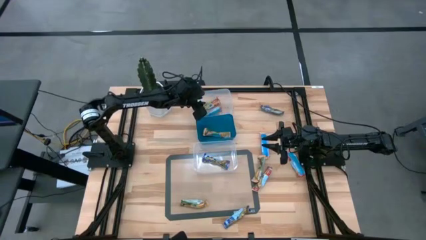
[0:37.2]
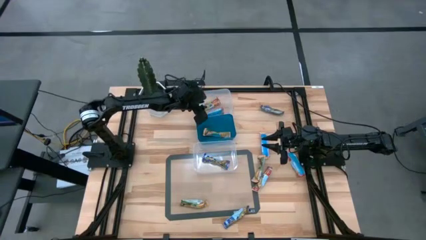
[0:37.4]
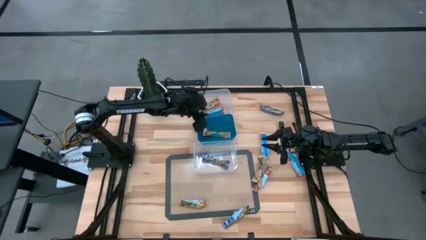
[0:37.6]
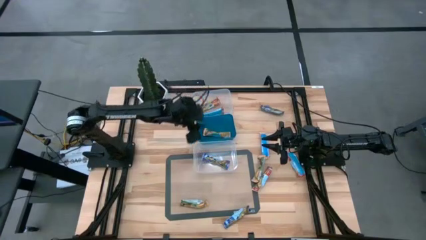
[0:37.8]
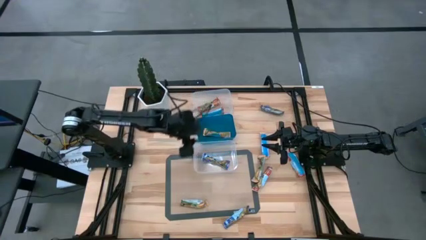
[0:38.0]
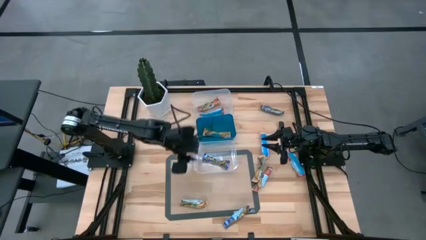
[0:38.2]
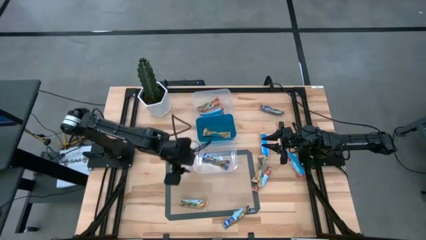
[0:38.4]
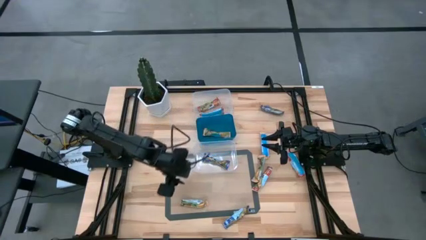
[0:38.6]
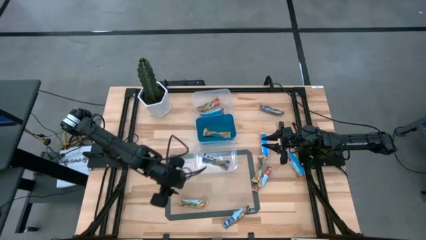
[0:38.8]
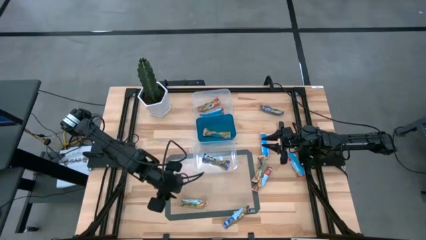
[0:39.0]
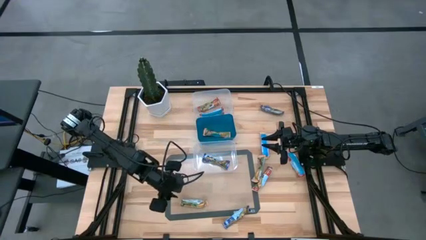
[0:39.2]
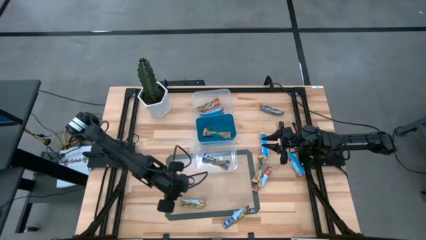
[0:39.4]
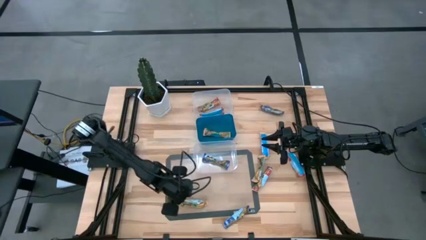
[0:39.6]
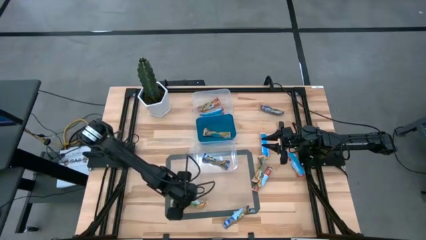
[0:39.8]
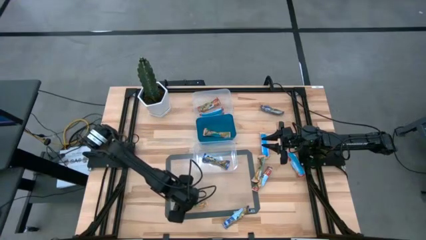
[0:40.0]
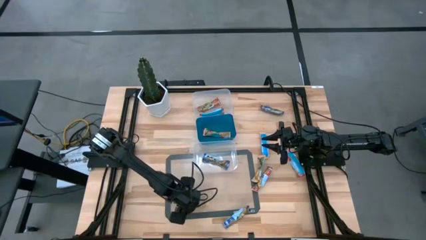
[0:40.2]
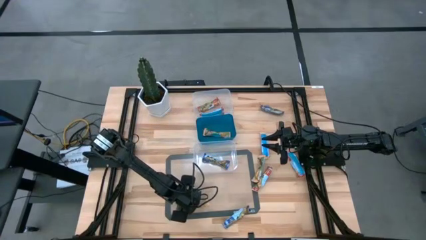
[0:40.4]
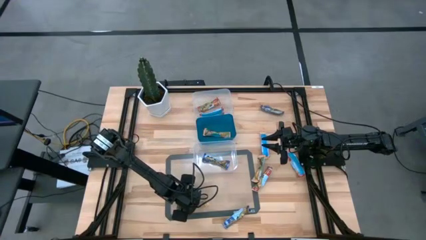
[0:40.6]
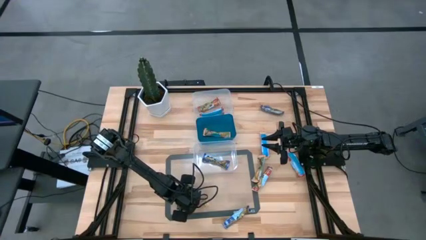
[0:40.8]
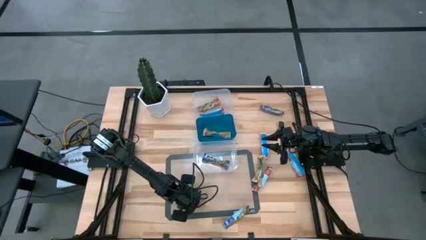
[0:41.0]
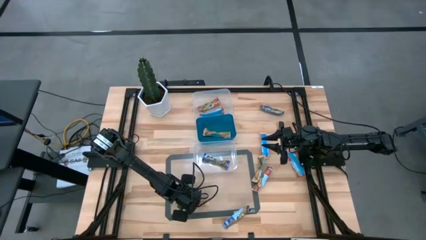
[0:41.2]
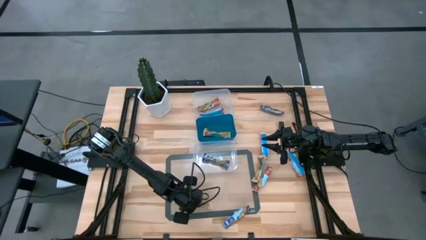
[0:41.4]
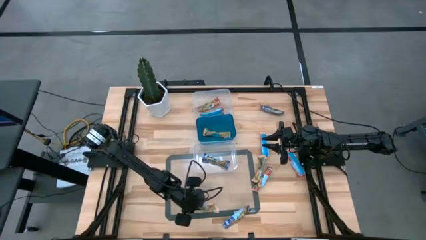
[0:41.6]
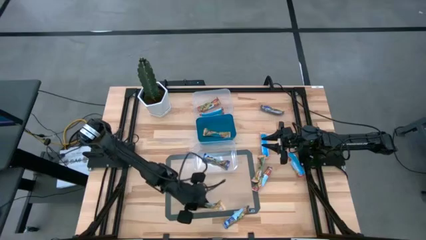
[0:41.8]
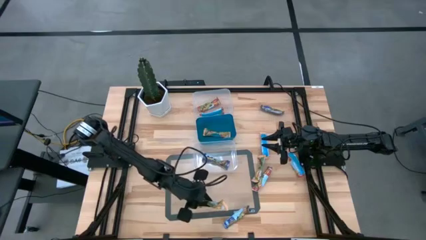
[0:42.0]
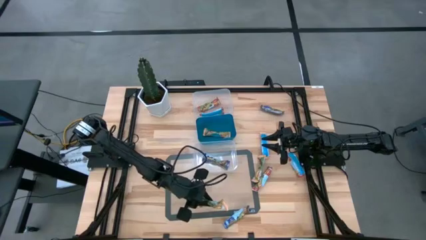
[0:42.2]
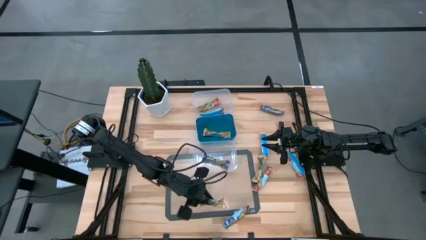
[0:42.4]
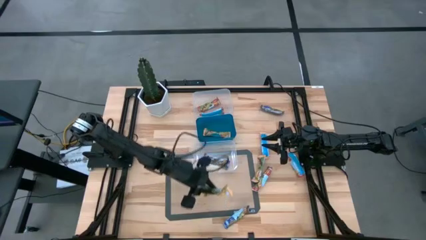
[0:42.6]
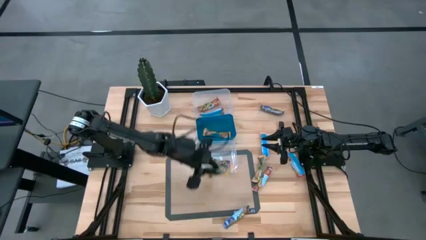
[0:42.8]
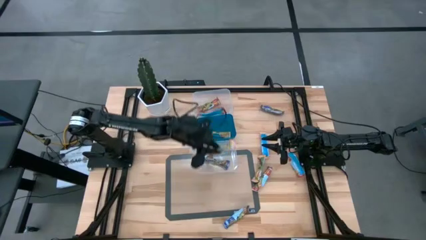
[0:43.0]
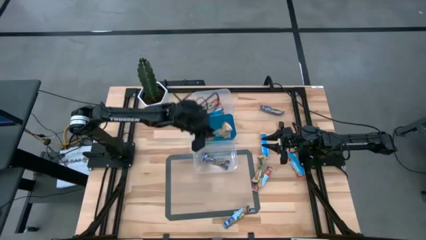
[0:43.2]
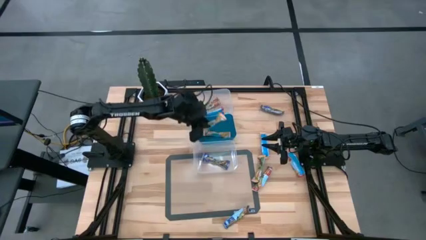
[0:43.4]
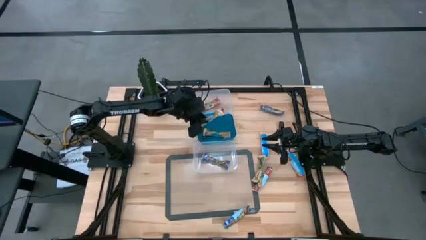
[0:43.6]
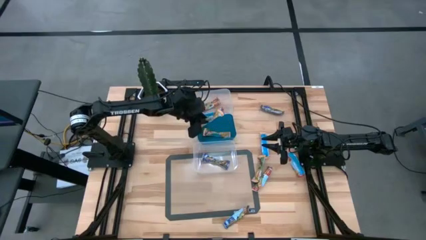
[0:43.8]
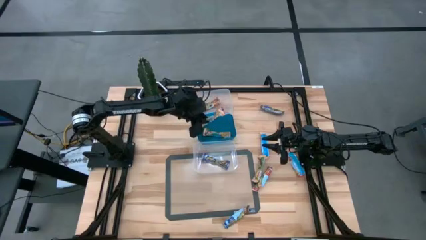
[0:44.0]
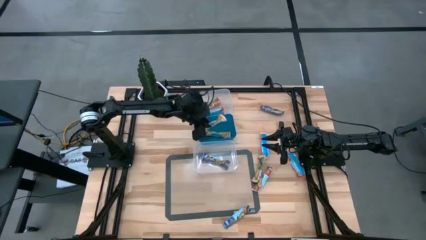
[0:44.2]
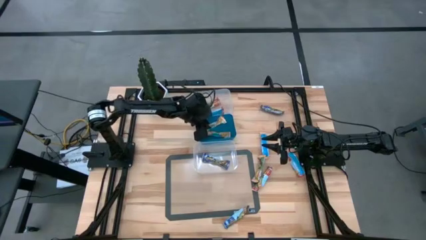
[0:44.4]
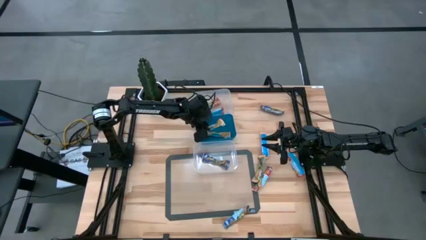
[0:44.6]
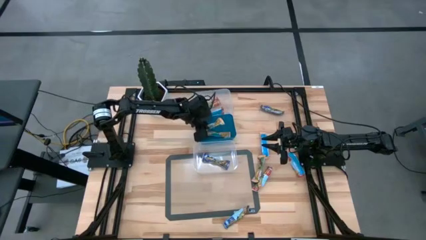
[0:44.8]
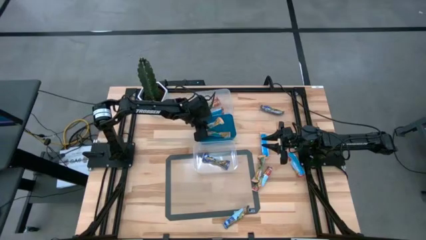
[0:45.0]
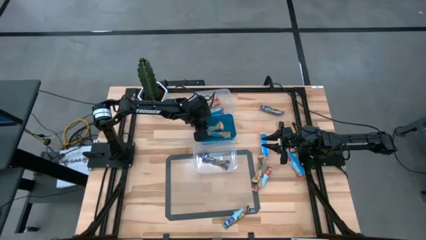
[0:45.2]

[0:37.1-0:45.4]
Task: Pick and place Granola Bars by type
Put the yellow granola bar into the blue bin

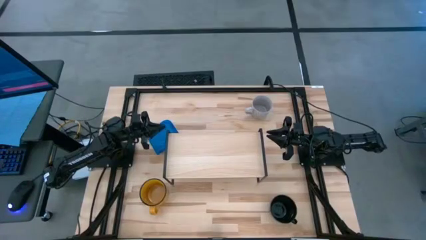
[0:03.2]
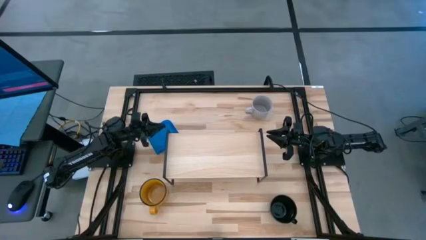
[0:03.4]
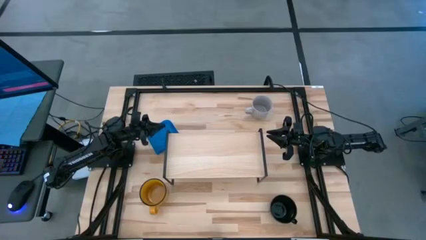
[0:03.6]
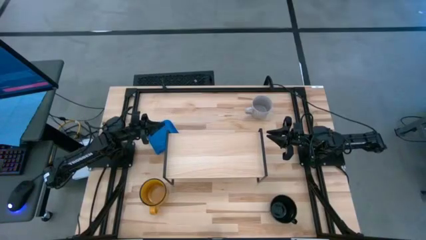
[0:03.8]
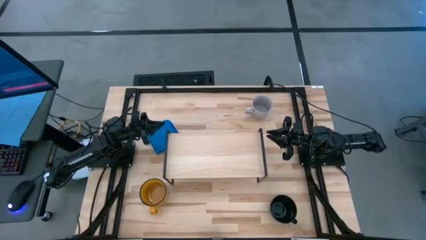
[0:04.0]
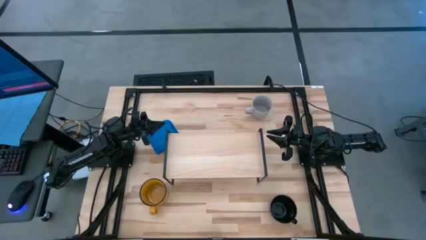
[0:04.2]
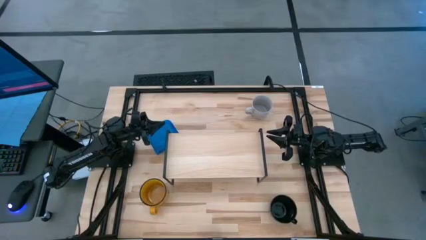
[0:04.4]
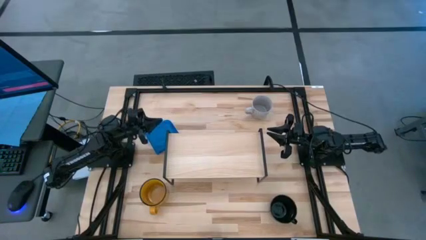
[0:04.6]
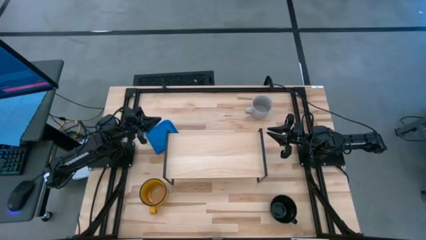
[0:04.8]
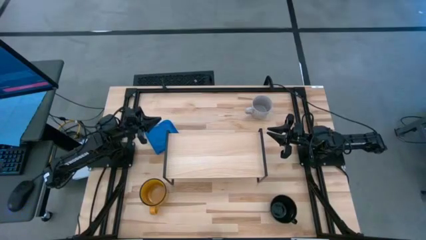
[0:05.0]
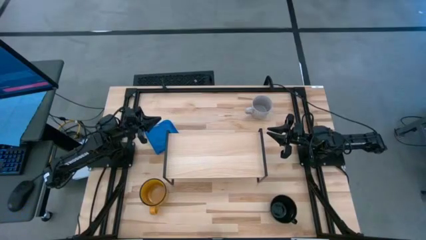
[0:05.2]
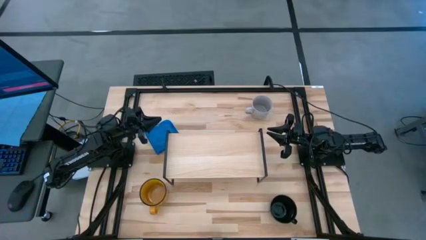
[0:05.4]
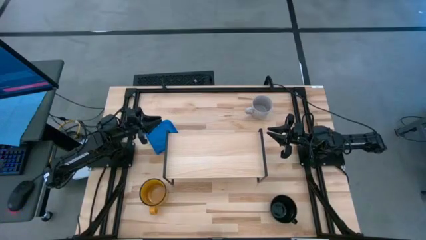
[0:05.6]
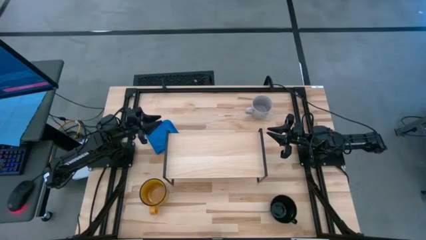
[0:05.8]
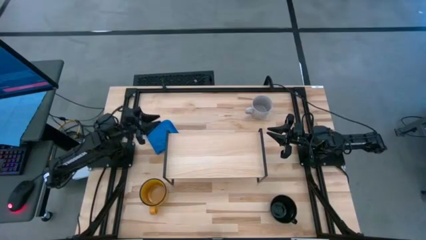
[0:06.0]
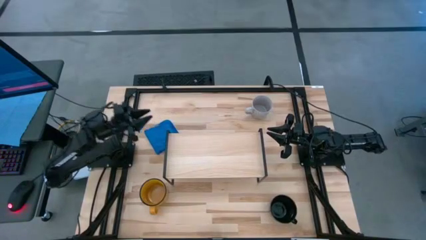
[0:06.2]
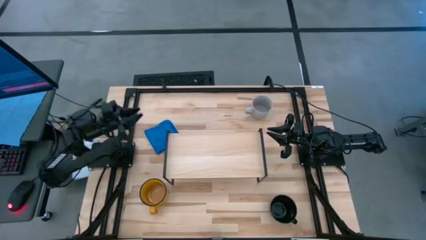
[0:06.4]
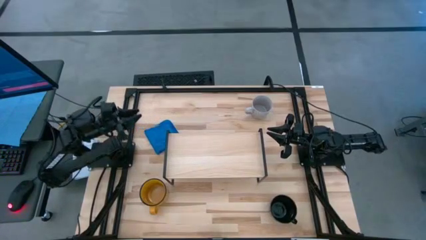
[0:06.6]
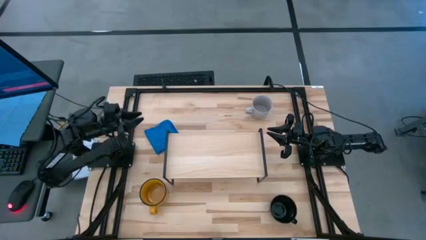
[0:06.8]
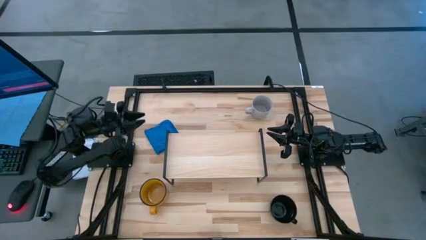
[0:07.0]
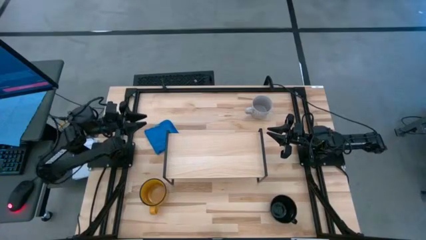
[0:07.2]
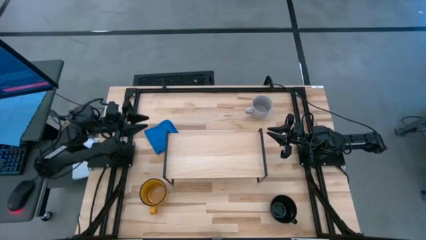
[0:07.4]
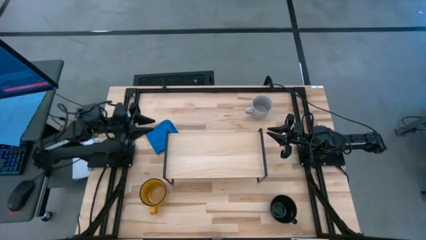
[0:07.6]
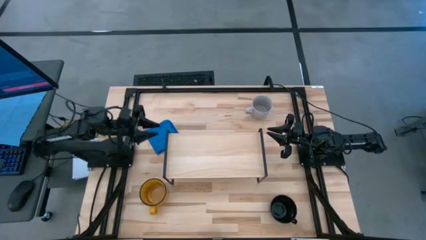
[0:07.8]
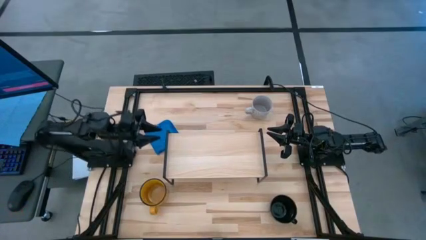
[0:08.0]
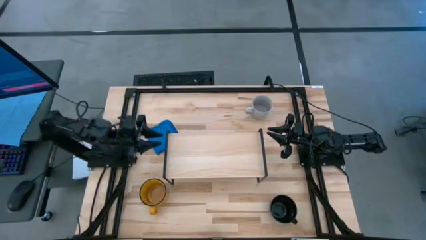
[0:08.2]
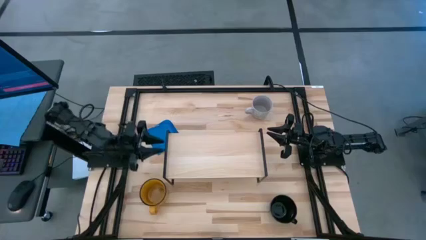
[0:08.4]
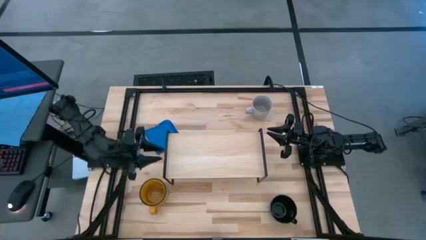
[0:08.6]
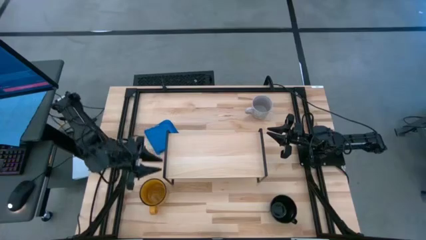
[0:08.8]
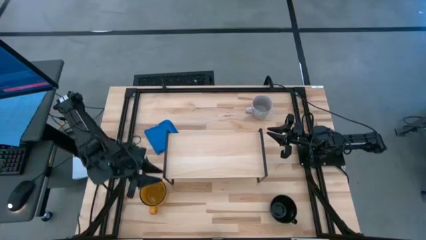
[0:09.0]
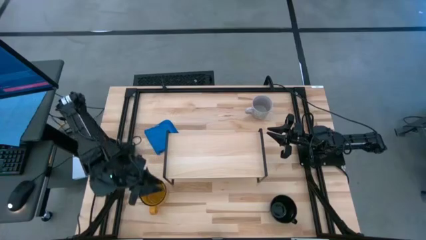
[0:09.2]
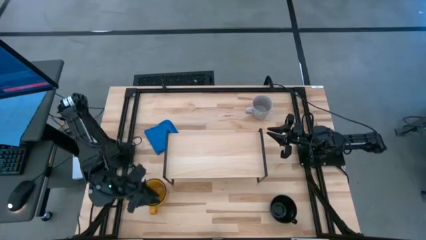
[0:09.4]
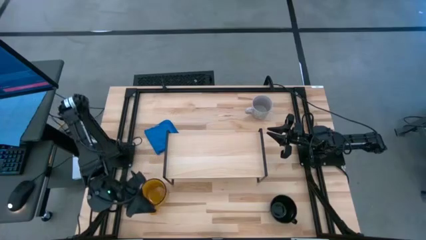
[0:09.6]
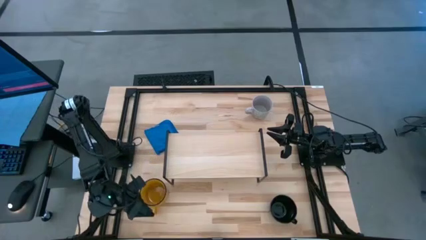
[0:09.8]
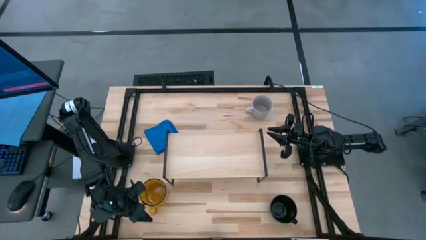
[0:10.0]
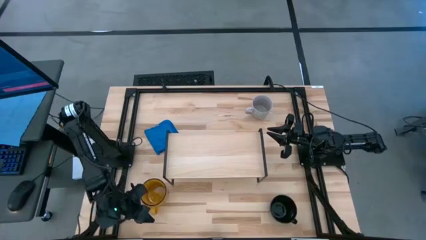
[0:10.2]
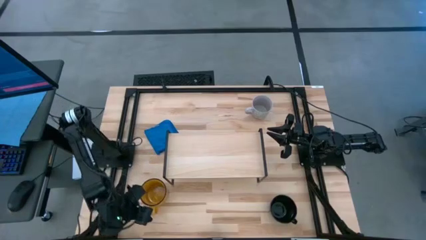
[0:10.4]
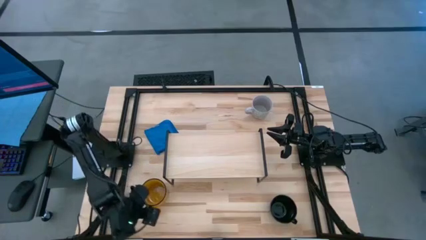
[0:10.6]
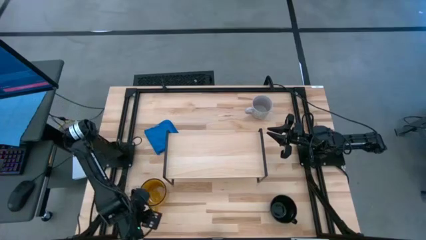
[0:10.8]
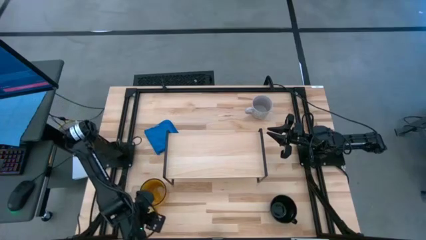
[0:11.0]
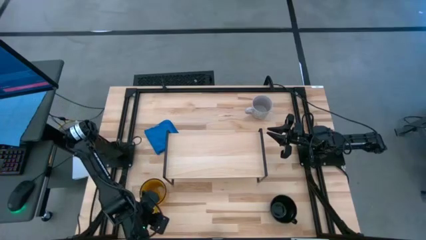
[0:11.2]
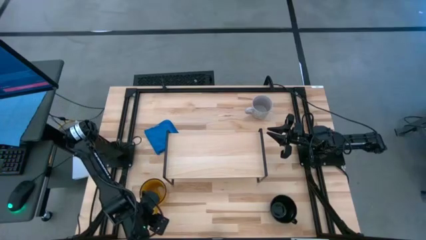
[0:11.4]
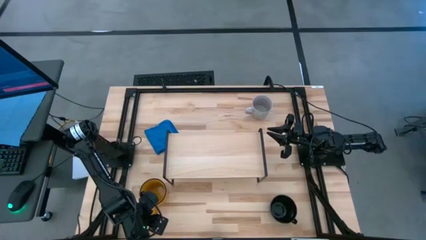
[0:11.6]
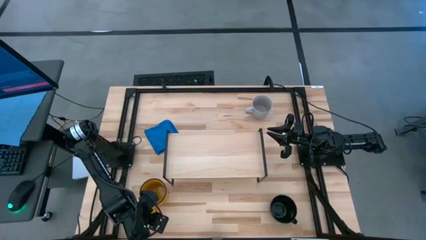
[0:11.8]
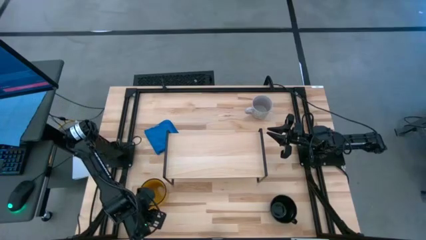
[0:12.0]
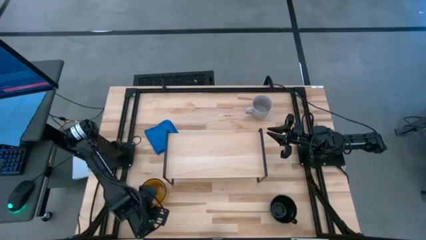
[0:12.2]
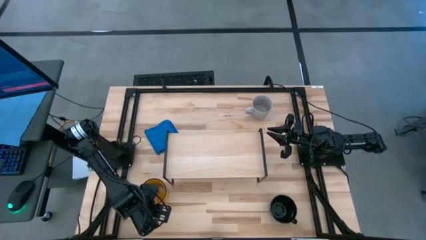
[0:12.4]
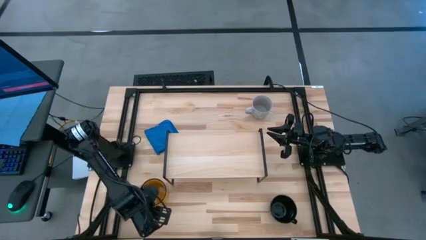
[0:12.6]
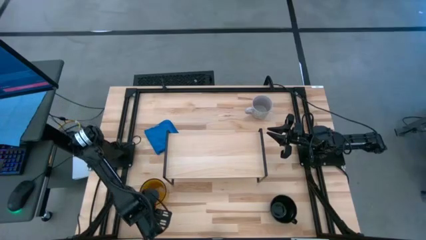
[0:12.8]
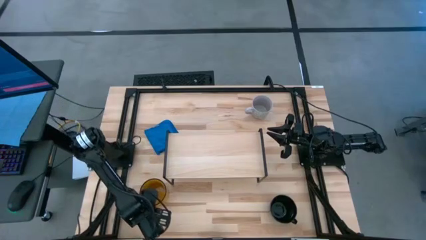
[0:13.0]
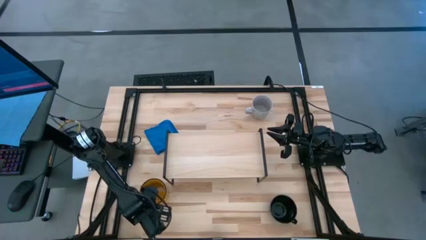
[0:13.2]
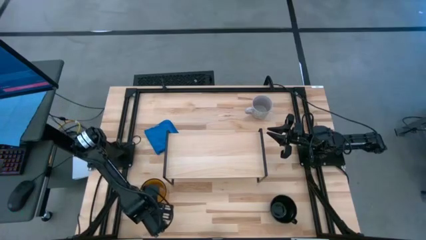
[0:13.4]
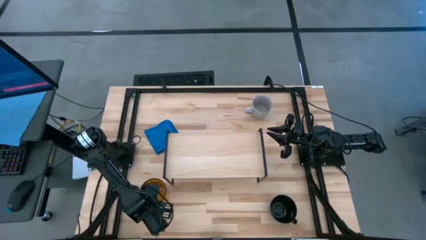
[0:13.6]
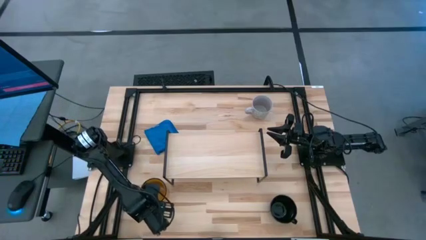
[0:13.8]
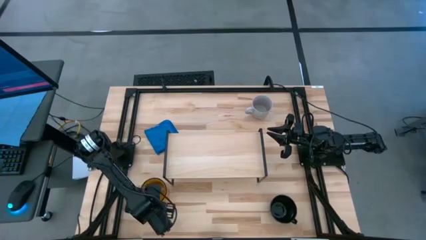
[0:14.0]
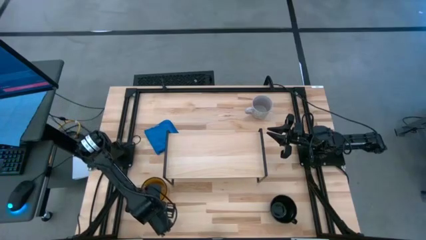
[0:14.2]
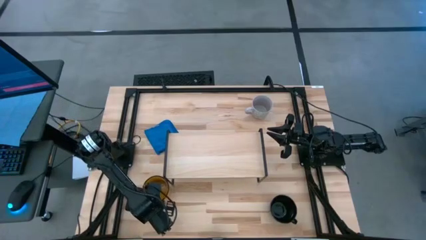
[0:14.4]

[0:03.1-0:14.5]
Task: Stack small to large cups/mugs on shelf
Put the yellow cup on the shelf
